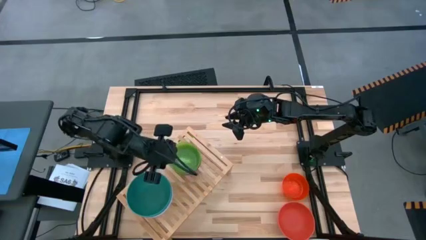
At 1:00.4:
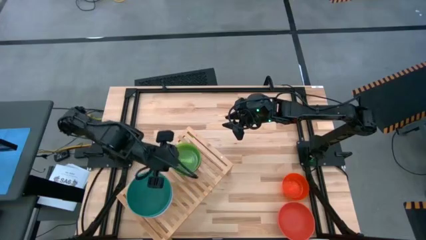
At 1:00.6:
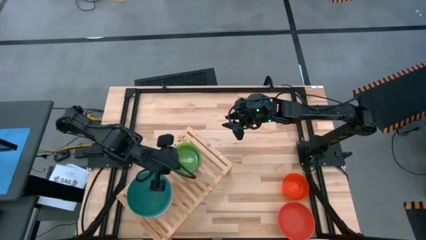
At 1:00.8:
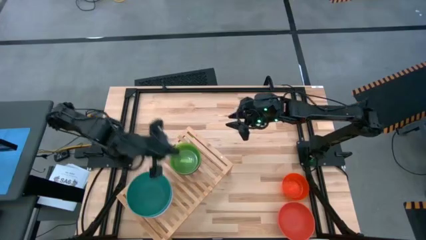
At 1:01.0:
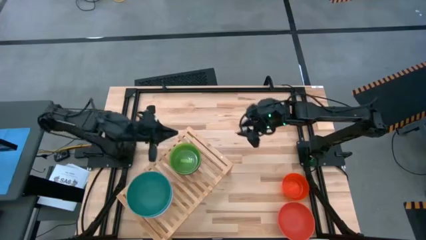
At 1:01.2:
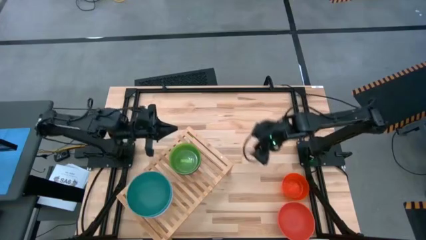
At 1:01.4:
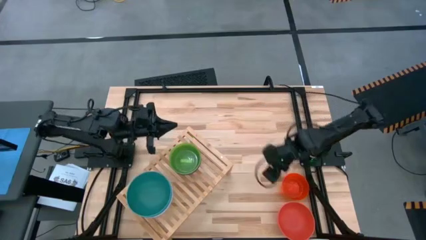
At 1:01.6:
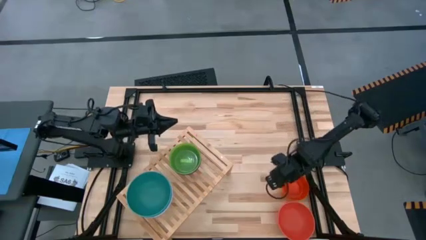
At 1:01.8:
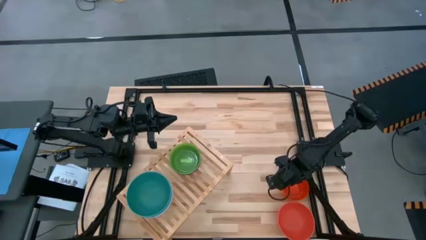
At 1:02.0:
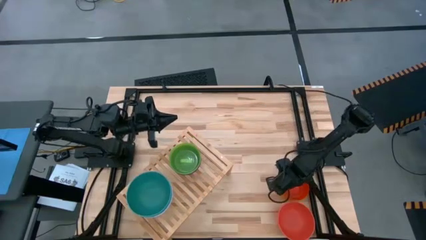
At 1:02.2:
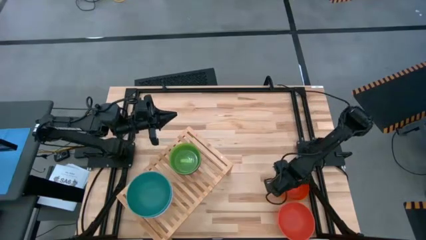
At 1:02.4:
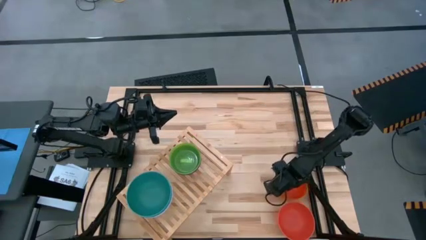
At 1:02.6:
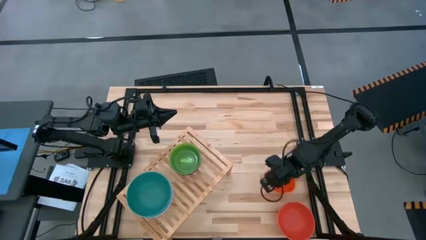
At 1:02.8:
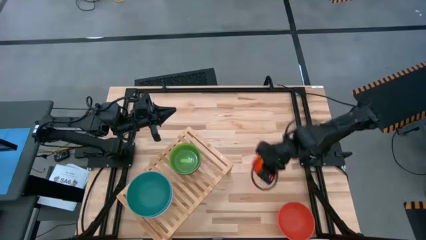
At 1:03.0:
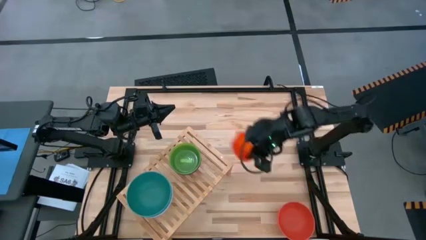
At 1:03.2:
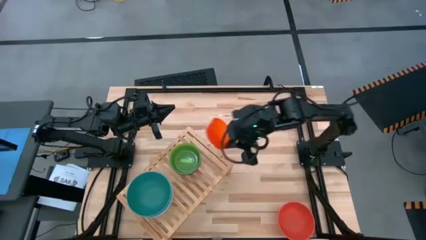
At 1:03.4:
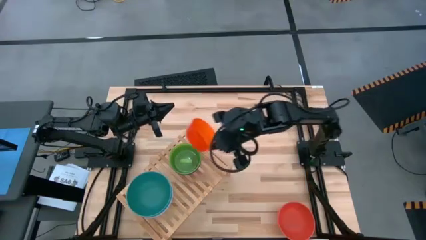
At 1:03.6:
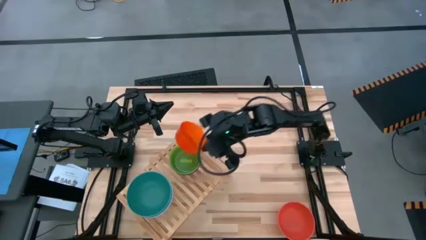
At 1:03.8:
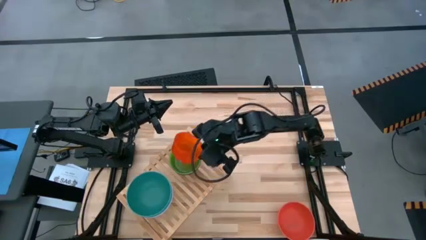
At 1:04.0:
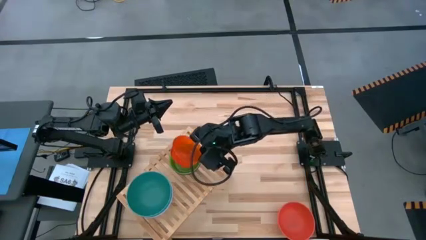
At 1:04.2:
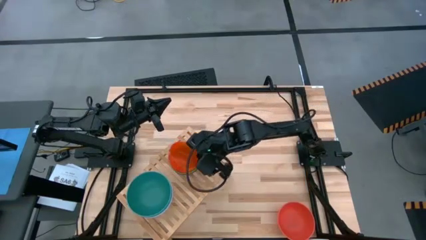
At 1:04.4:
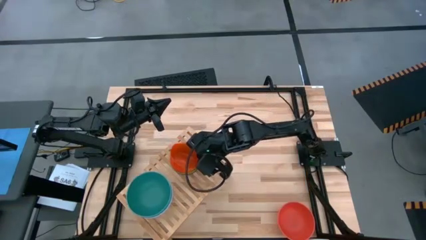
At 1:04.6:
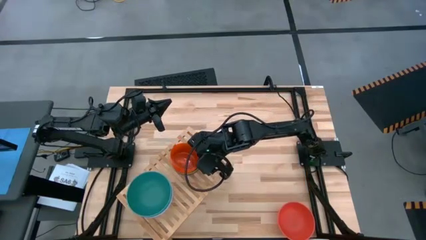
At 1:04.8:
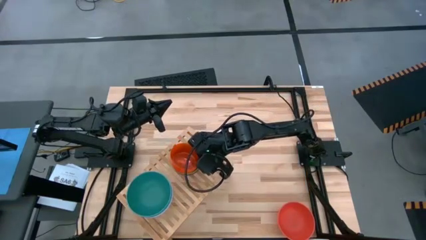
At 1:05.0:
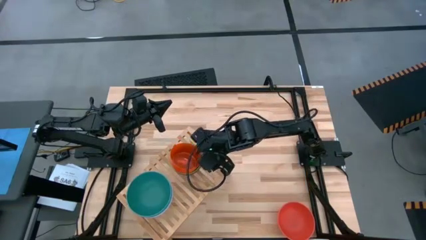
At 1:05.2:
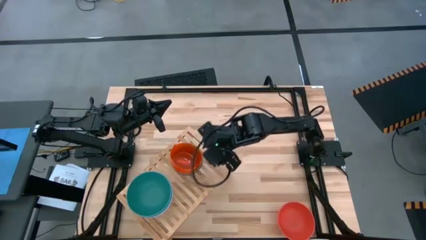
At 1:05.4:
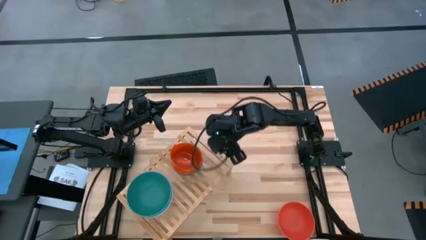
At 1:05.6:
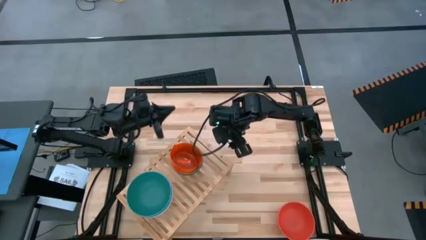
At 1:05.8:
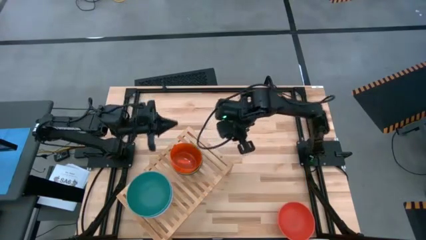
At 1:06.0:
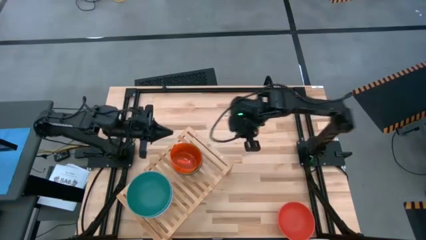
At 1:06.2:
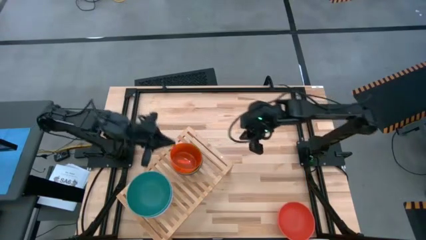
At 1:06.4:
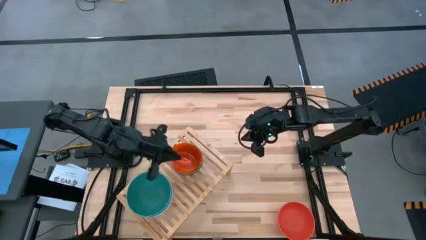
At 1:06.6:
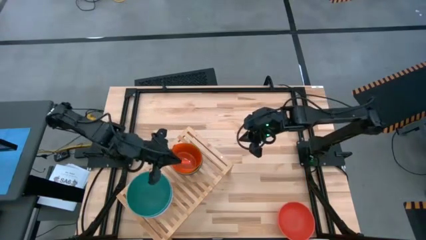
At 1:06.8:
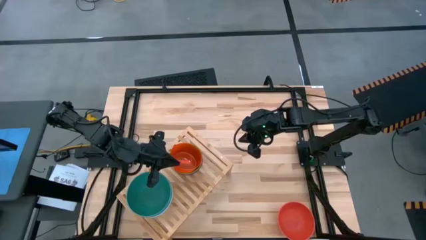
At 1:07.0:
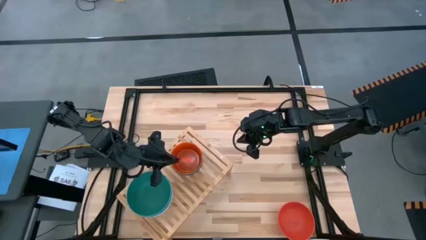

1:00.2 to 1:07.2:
Task: Place and stack bowls onto a shelf
Stack the small orange bowl on the shelf on top of the small green bowl on the shelf

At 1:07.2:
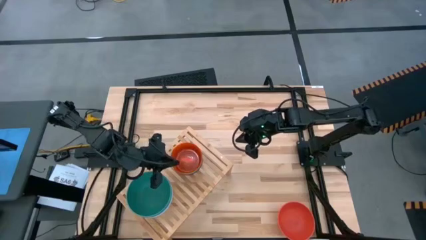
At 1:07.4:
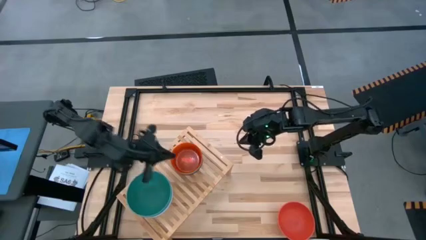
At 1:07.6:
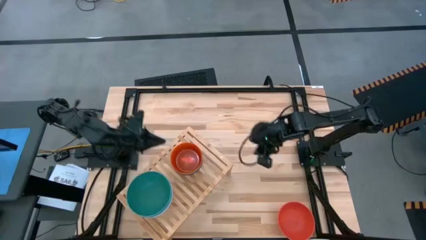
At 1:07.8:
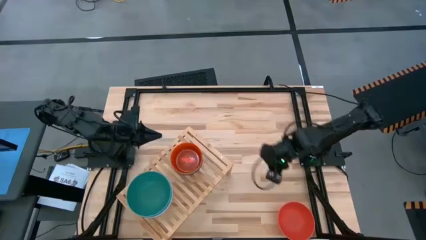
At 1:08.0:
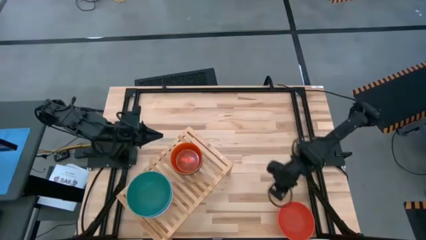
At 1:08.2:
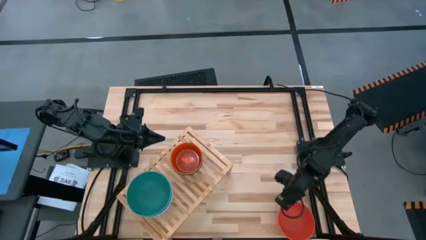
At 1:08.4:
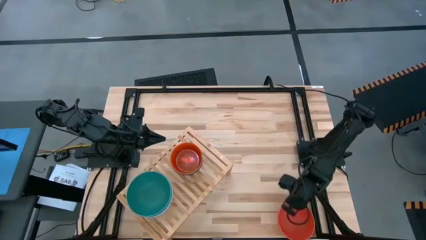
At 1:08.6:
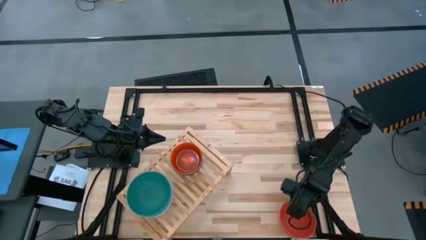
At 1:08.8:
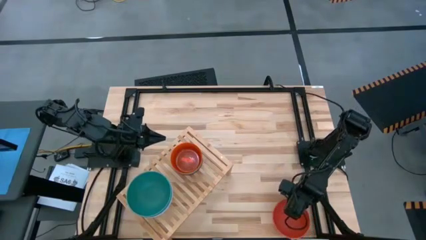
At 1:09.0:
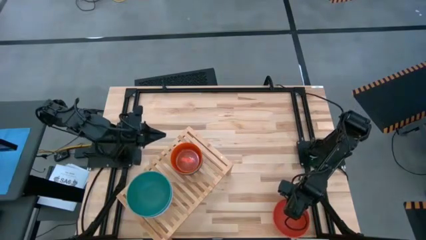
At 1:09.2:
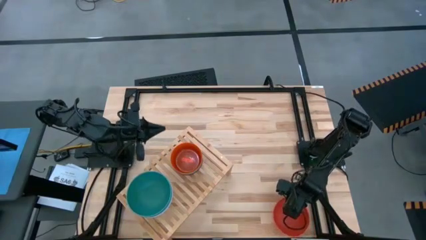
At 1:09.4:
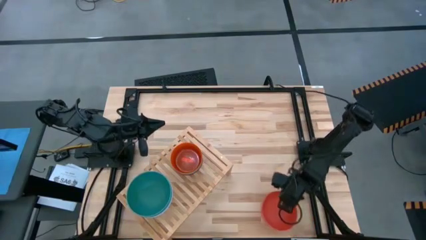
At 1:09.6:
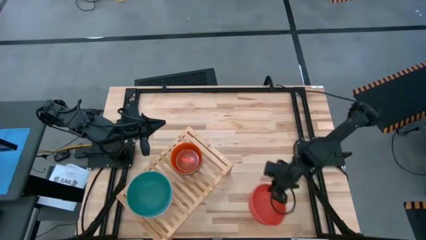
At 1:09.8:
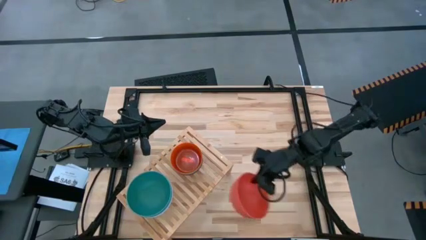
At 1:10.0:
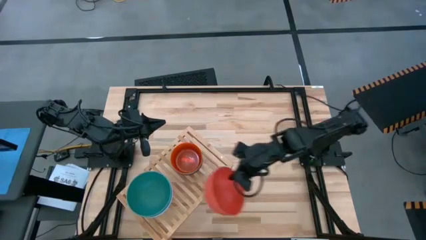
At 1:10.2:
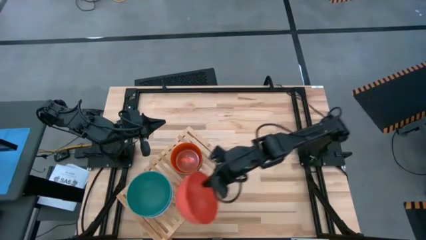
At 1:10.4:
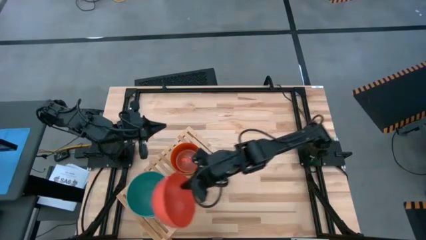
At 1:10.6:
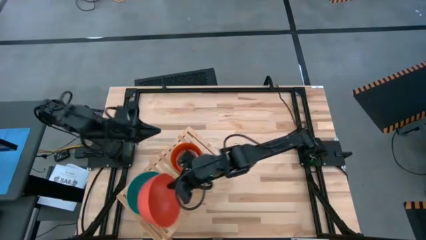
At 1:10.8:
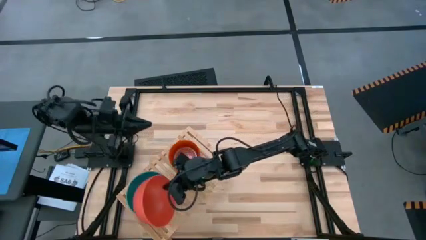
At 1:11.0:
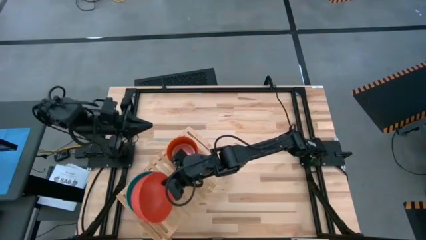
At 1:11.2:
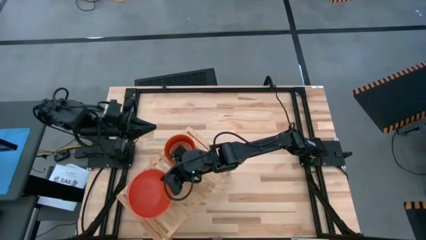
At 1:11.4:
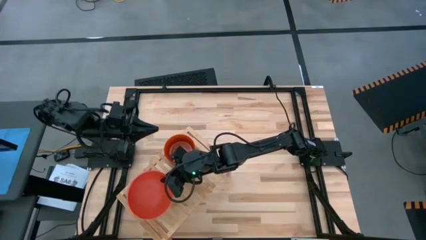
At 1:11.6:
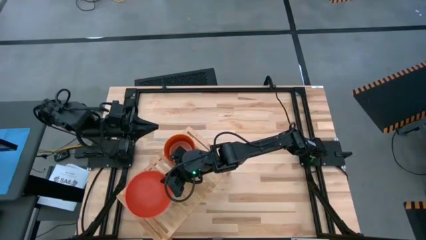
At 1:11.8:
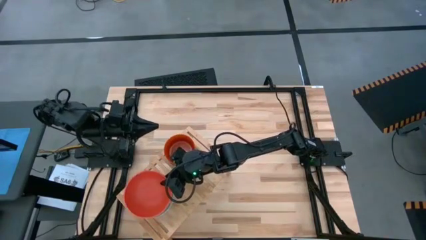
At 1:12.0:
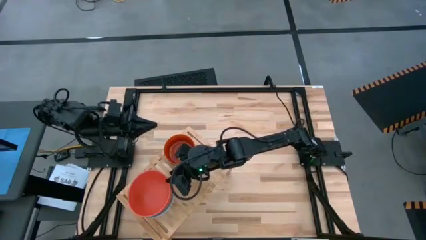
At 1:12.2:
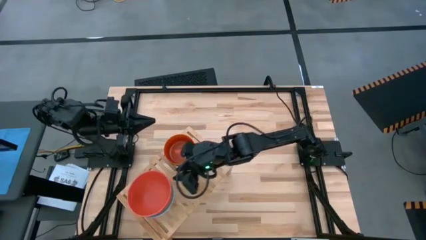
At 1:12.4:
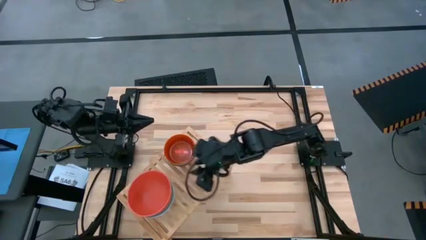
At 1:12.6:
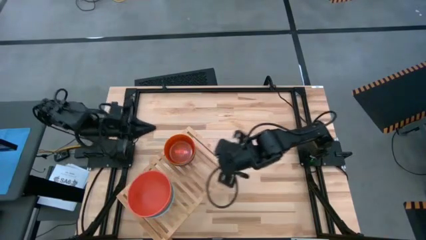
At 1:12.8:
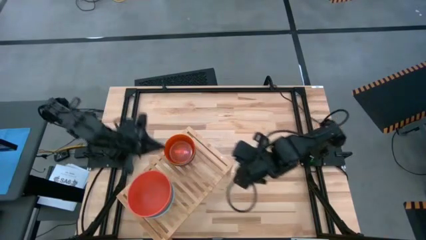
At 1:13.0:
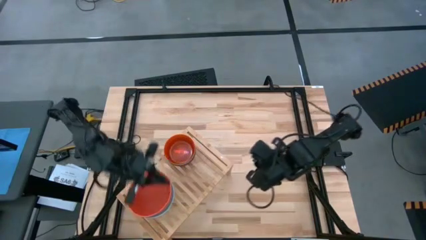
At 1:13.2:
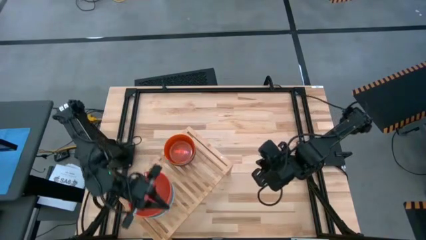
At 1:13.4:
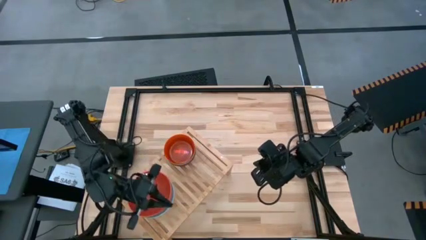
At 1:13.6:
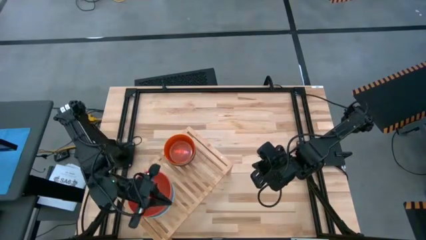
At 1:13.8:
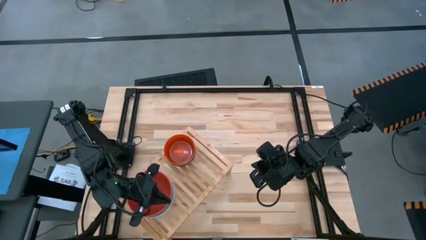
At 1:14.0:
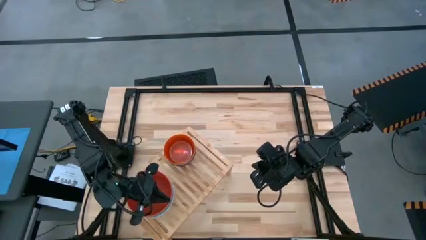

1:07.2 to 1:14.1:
Stack the large orange bowl on the shelf on top of the large green bowl on the shelf

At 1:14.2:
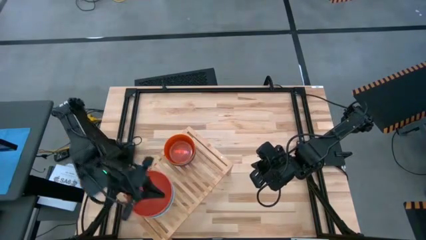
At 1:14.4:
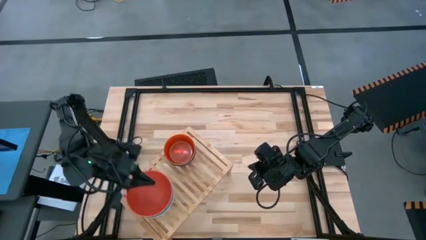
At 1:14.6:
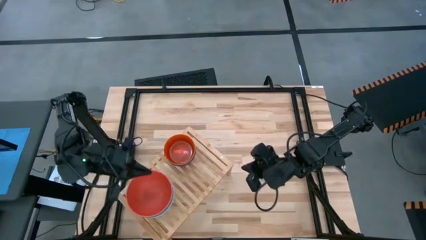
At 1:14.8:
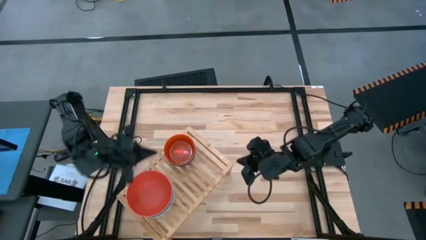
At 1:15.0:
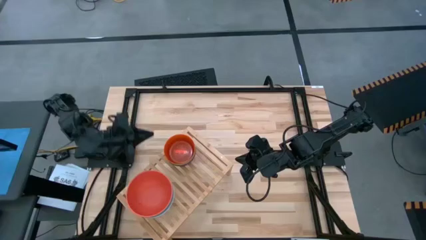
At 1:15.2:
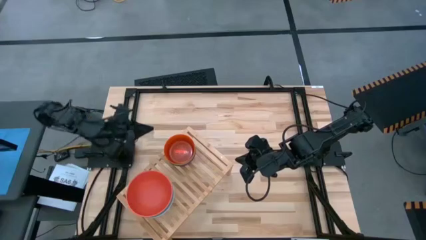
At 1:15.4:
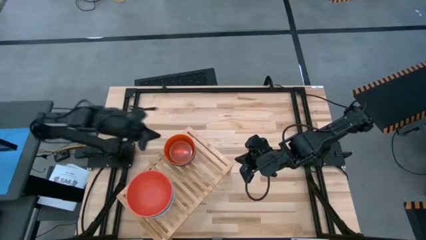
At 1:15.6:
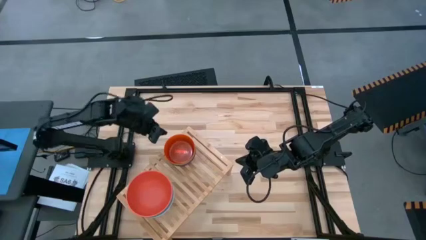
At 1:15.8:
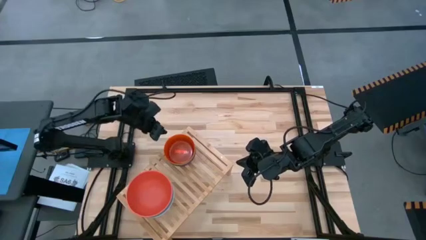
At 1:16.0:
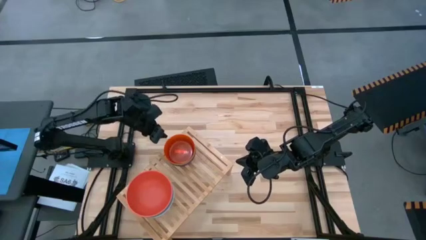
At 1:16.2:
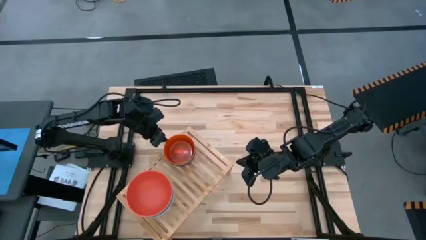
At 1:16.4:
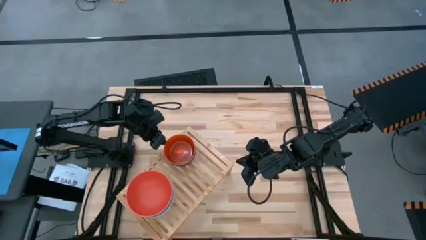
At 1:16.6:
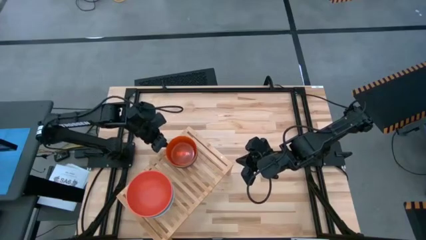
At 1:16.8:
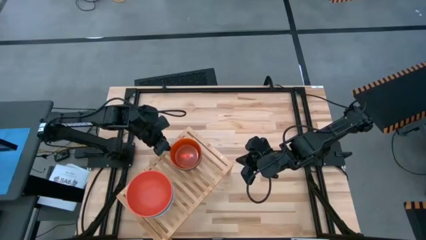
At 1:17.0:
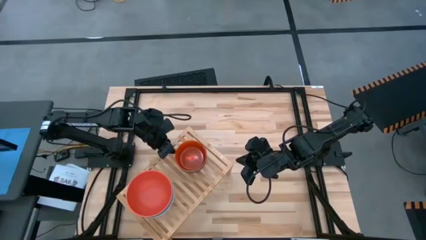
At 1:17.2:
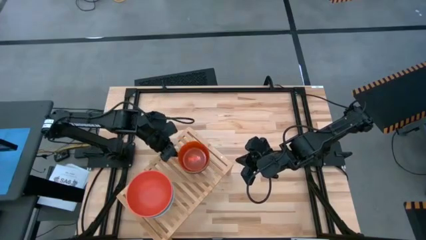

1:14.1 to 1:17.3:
Adjust the small stacked bowl on the shelf
